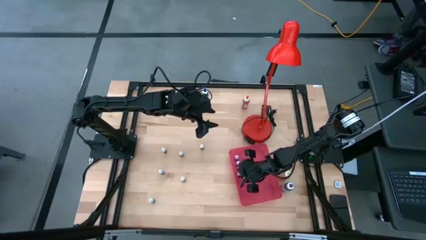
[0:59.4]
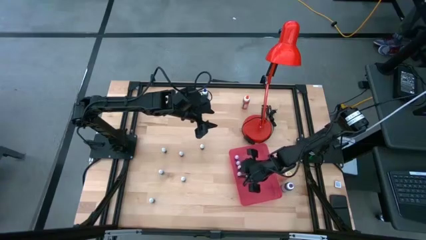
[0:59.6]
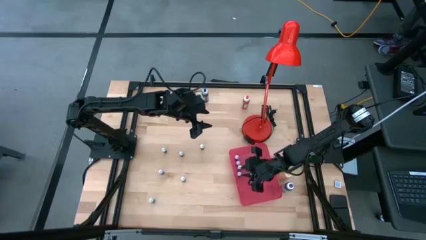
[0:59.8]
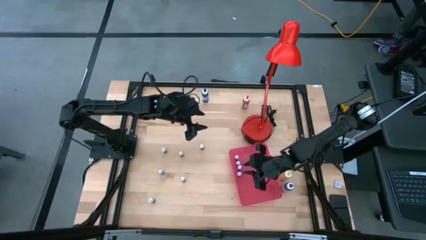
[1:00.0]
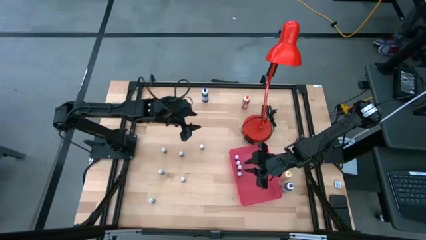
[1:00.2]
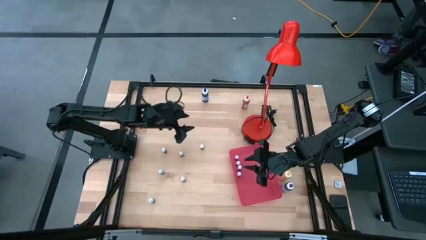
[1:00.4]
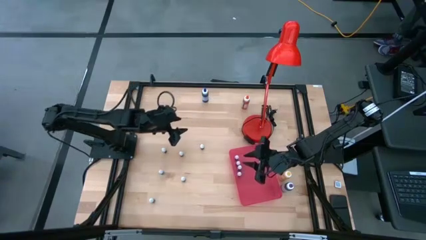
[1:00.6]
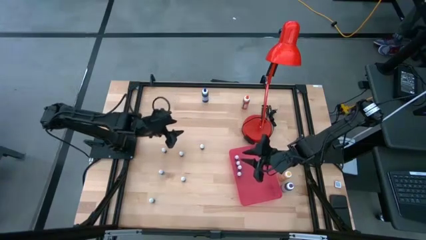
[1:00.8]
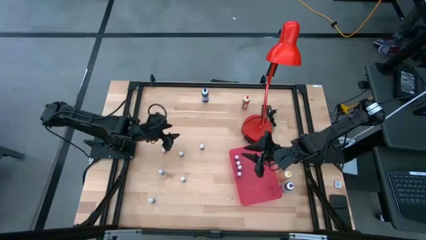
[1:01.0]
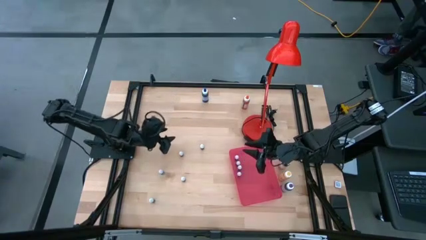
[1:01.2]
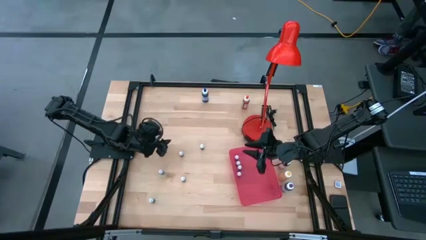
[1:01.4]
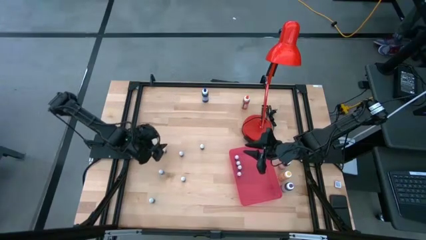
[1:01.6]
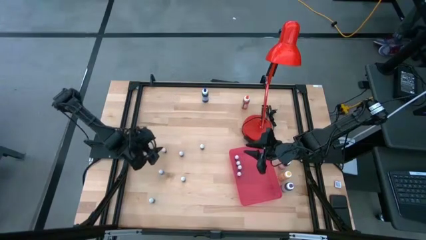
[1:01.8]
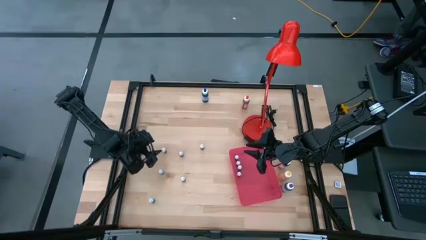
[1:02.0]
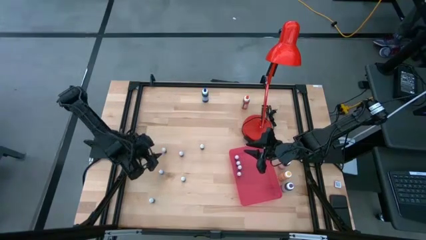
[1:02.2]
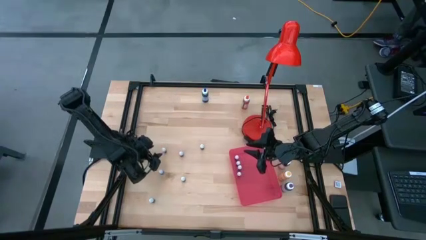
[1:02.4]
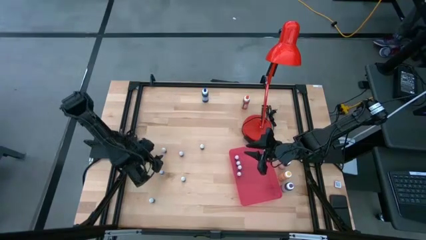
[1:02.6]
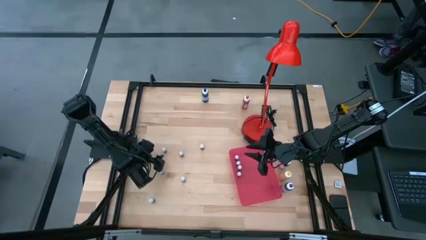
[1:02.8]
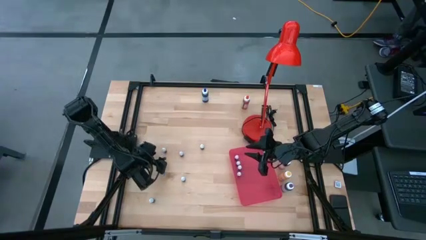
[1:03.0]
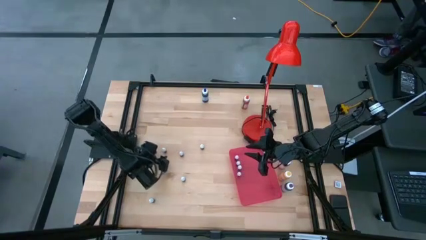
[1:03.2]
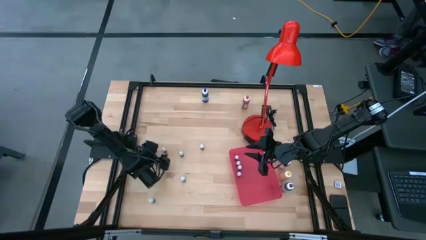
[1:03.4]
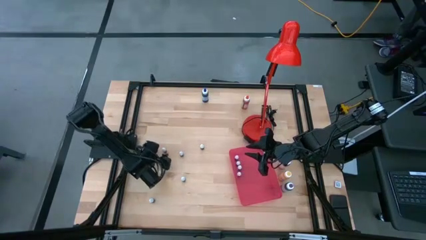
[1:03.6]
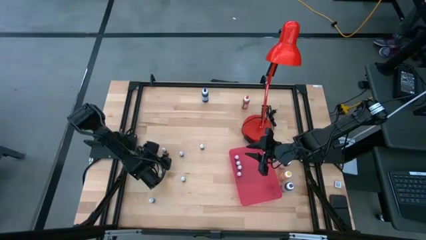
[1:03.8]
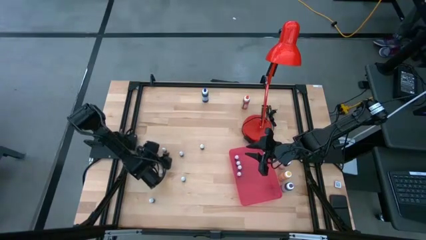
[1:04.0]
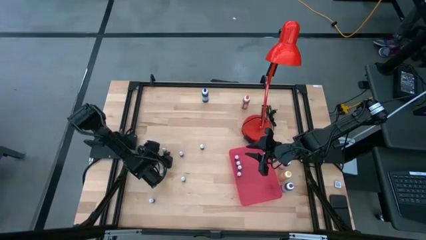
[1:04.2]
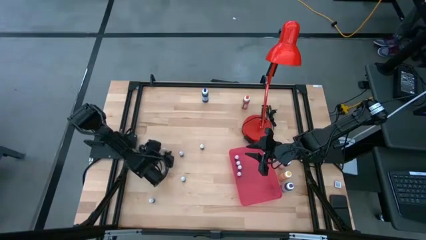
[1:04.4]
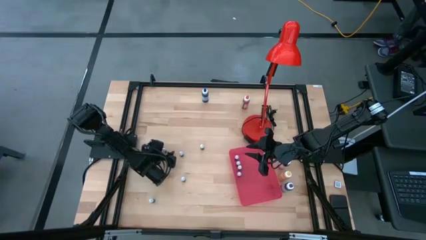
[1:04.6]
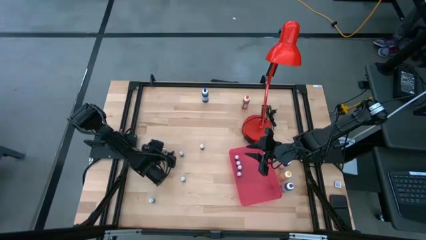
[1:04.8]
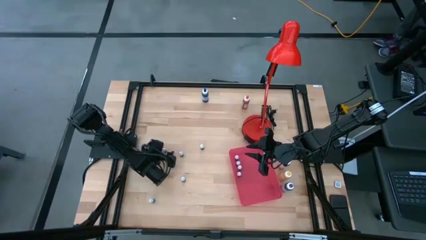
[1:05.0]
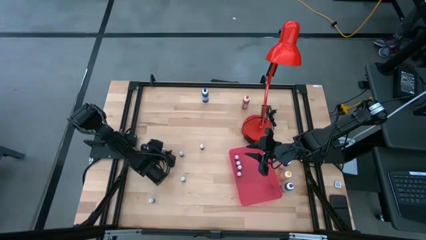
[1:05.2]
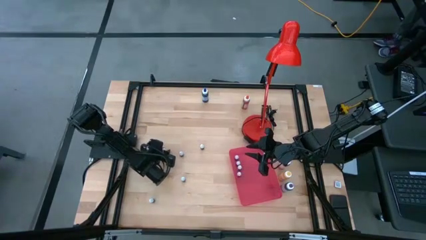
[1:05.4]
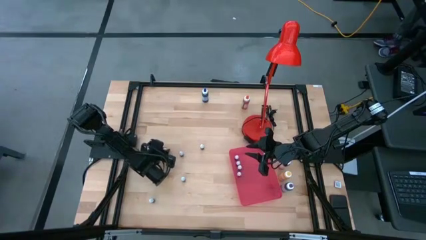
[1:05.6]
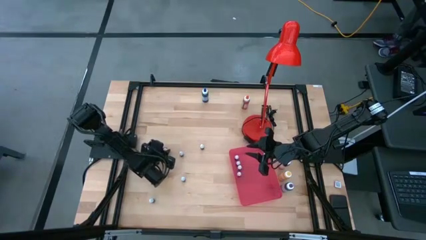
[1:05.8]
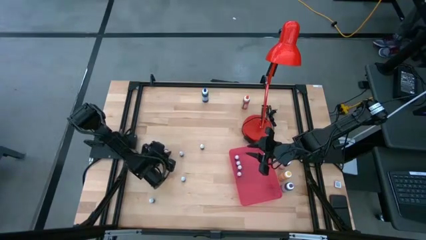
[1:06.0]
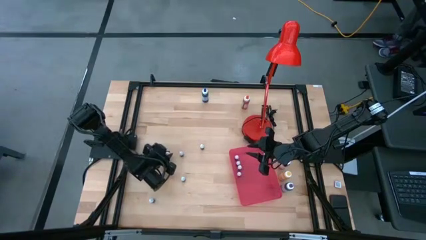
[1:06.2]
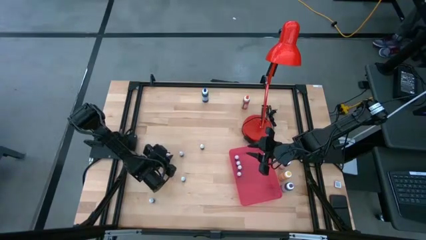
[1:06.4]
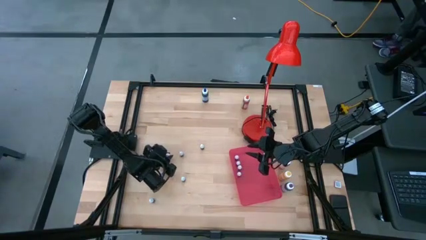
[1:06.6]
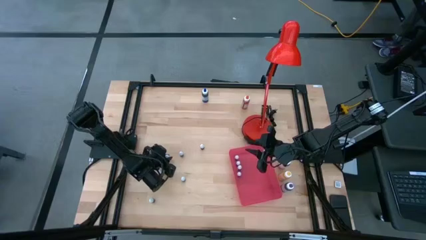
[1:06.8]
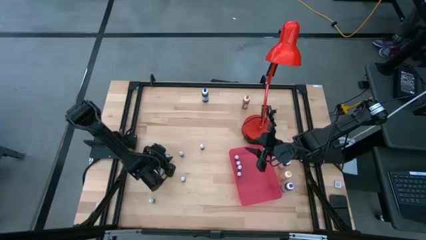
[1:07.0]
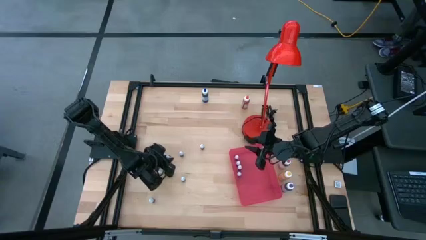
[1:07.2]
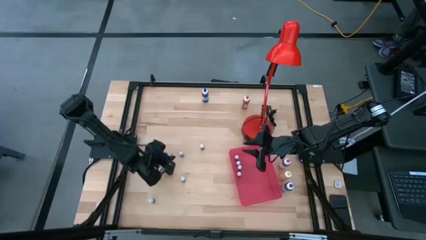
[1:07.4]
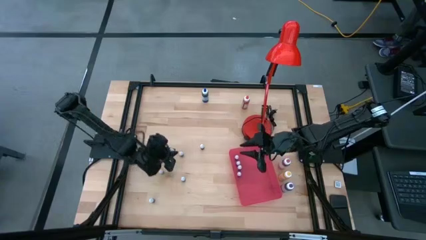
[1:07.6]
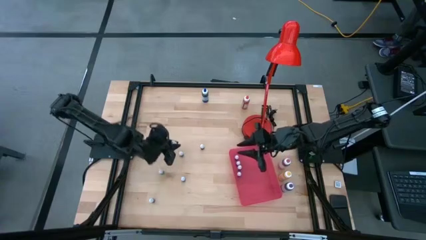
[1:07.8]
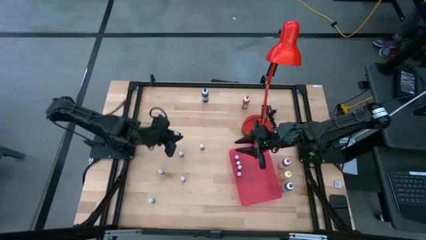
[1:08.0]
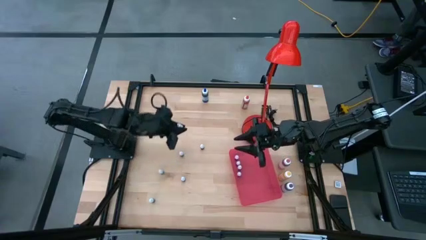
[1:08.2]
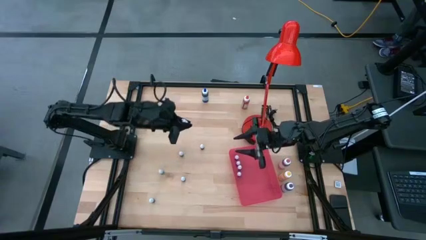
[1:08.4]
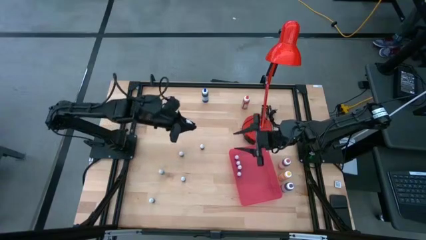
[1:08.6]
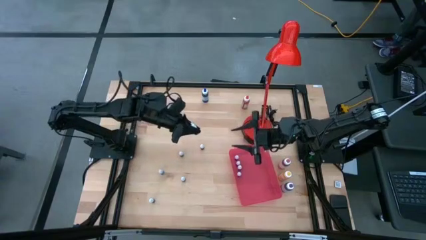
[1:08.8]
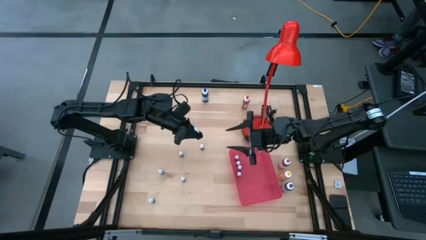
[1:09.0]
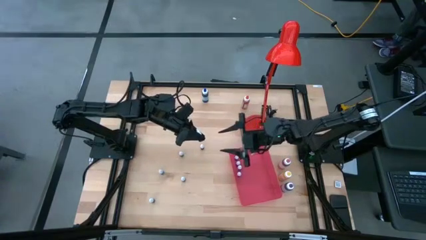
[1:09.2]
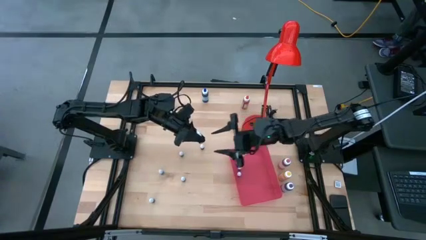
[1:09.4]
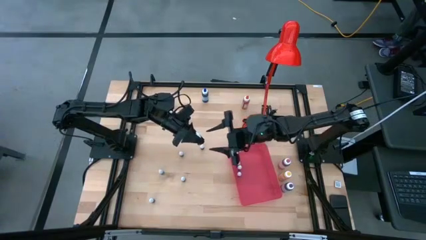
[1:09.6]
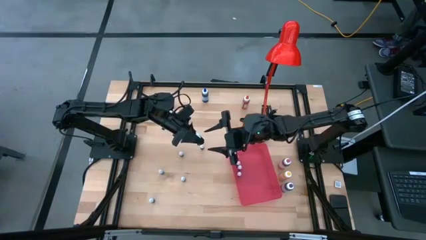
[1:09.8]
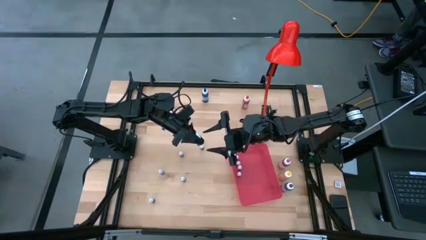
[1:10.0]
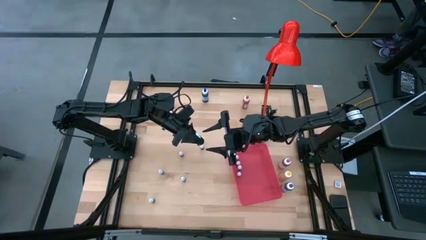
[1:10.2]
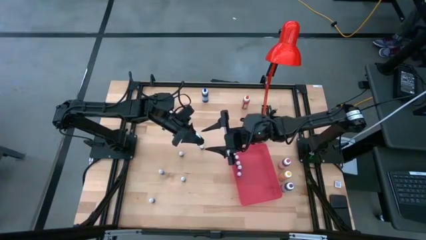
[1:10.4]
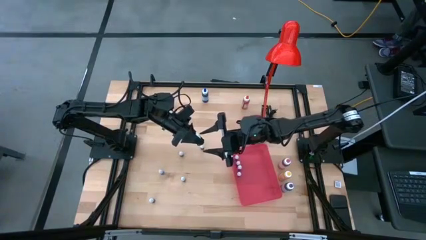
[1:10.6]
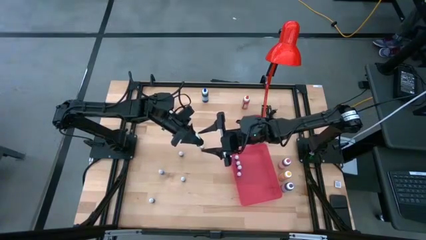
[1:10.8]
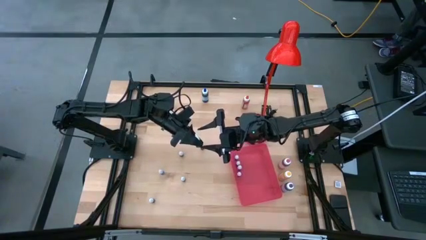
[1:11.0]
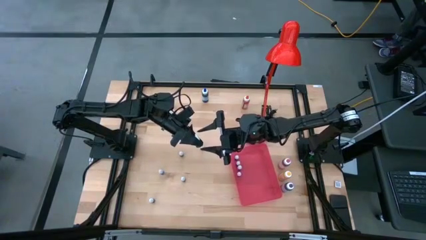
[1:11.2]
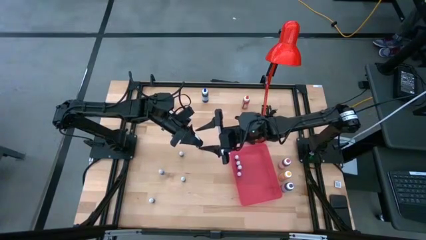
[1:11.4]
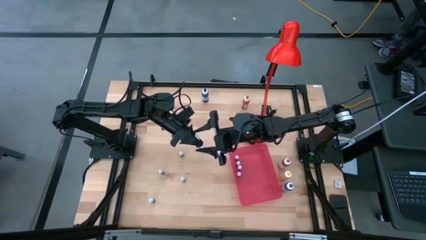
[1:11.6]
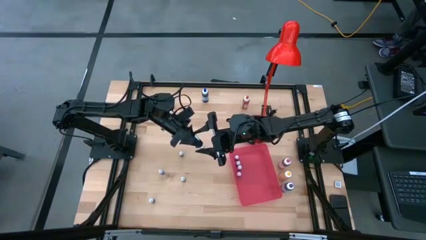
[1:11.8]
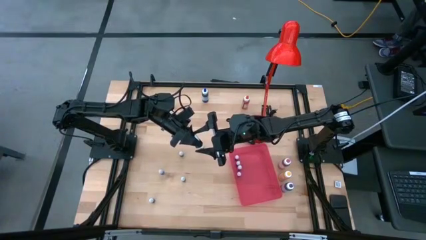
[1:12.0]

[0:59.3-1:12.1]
Task: Pick & Place food coloring
Put the small pink food coloring bottle into the red bin
